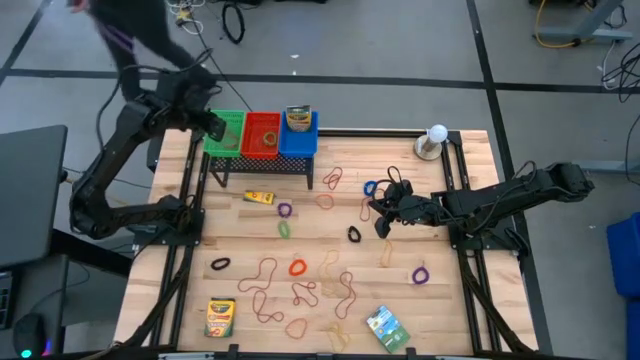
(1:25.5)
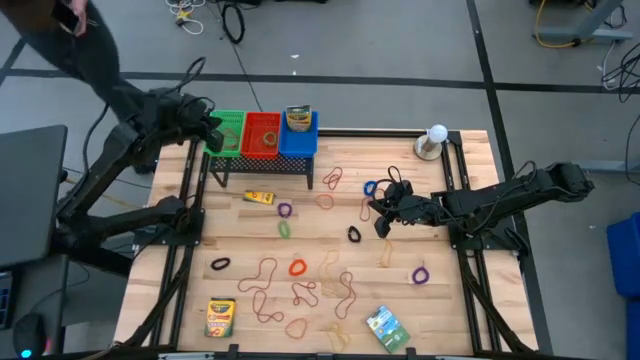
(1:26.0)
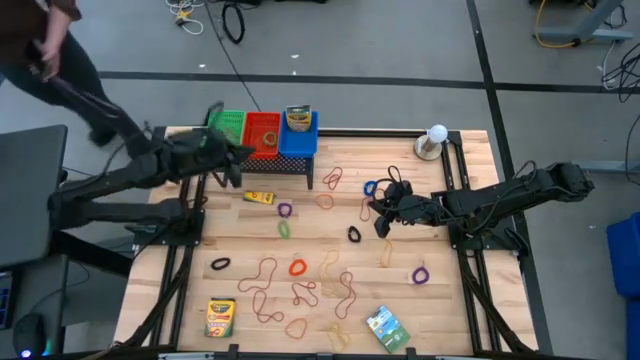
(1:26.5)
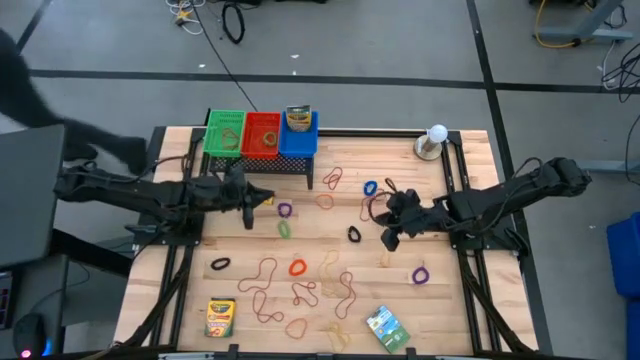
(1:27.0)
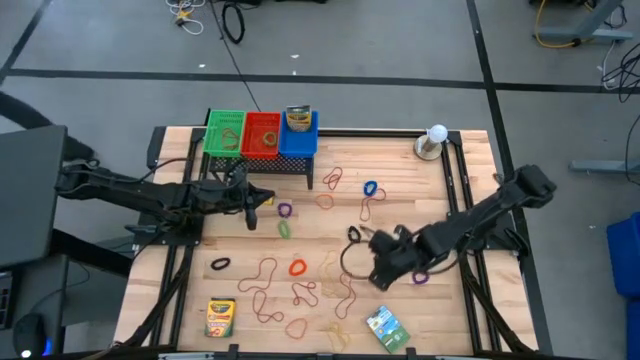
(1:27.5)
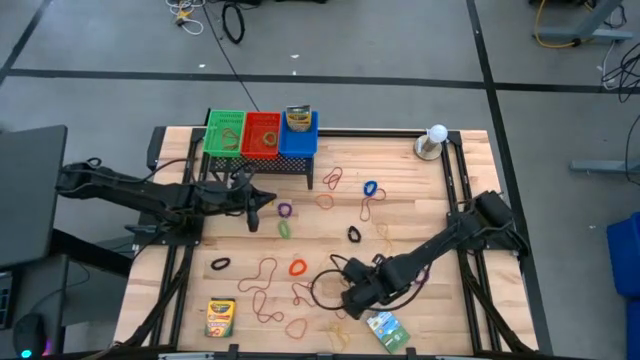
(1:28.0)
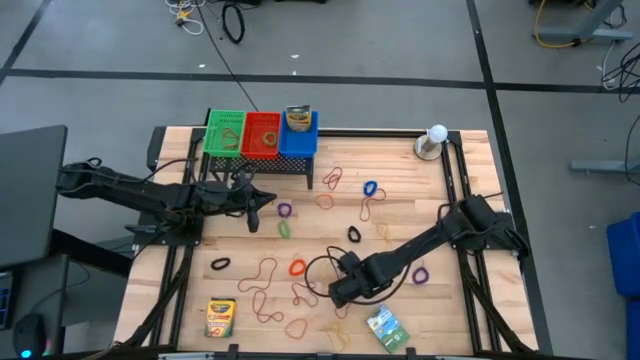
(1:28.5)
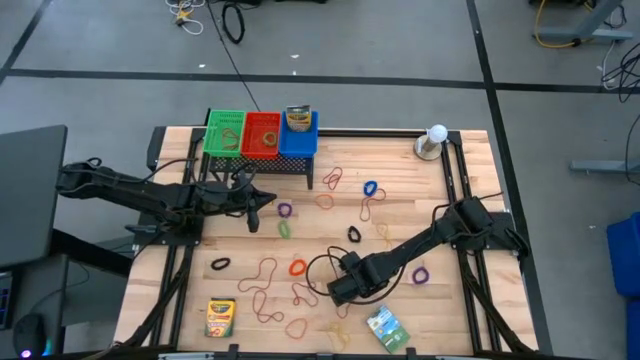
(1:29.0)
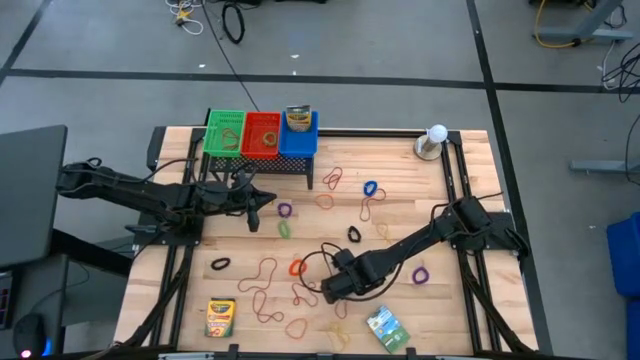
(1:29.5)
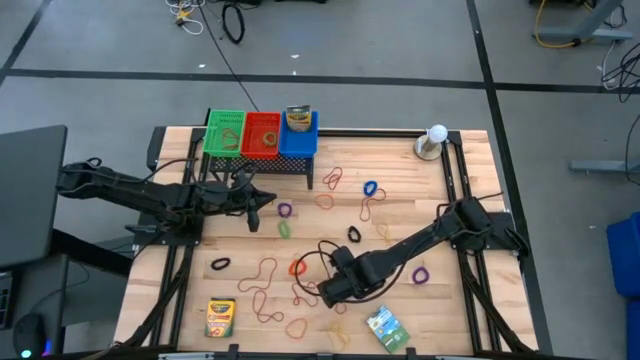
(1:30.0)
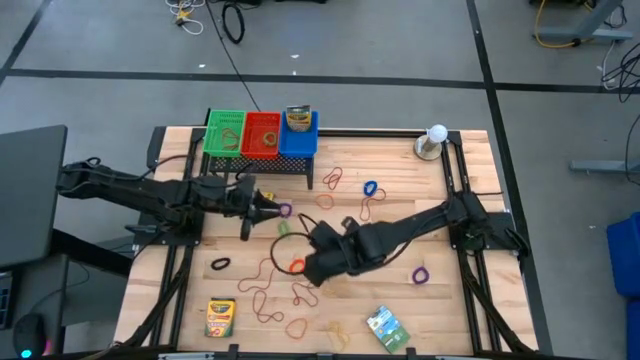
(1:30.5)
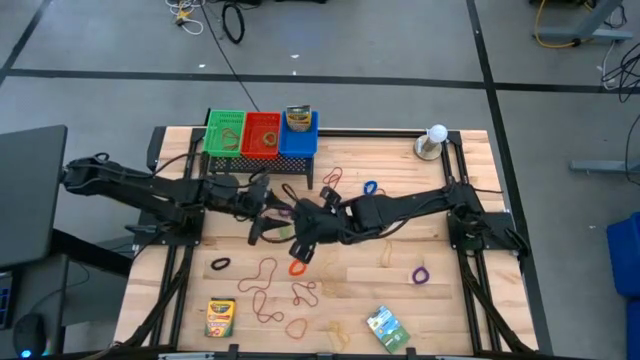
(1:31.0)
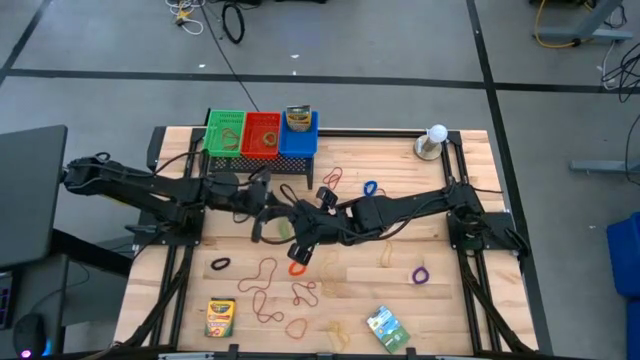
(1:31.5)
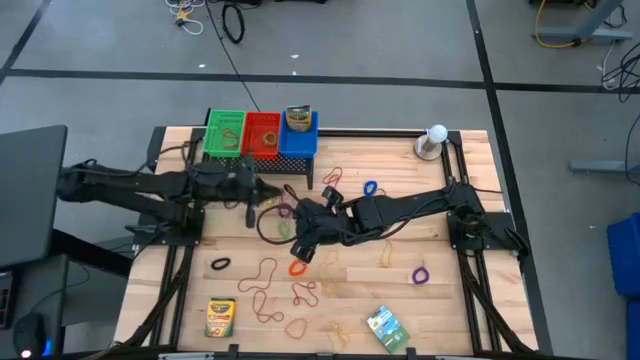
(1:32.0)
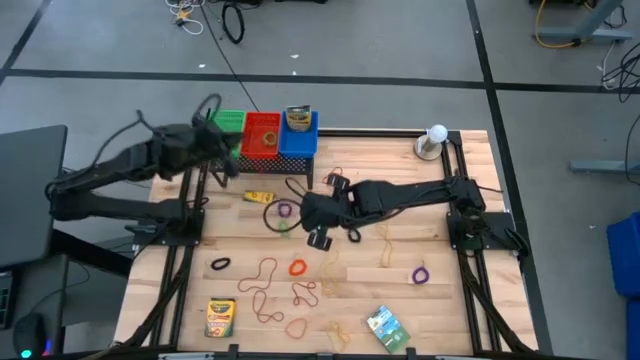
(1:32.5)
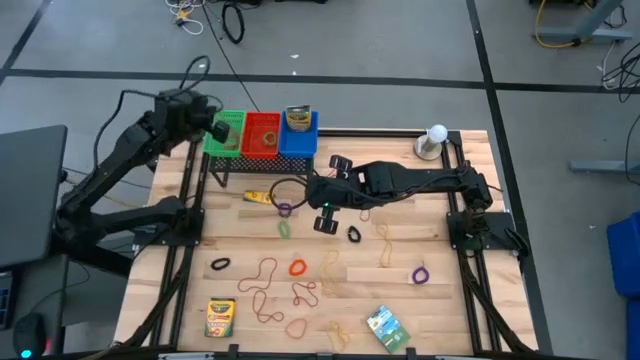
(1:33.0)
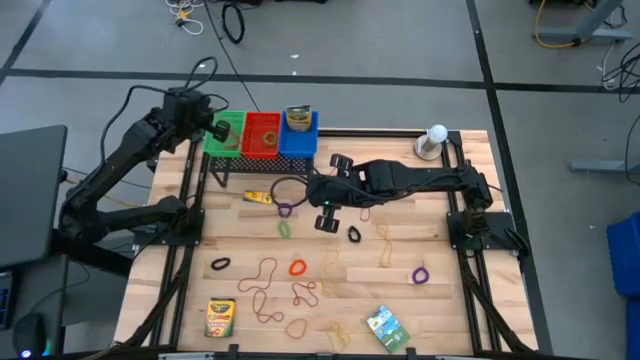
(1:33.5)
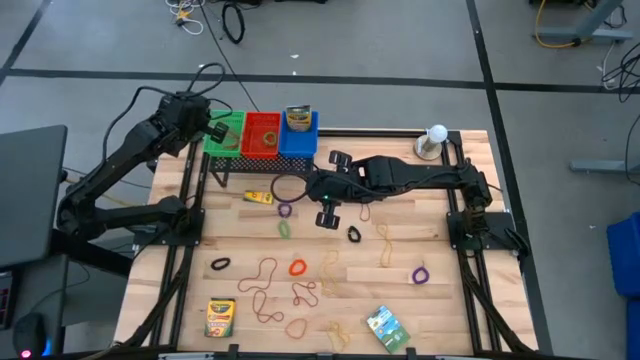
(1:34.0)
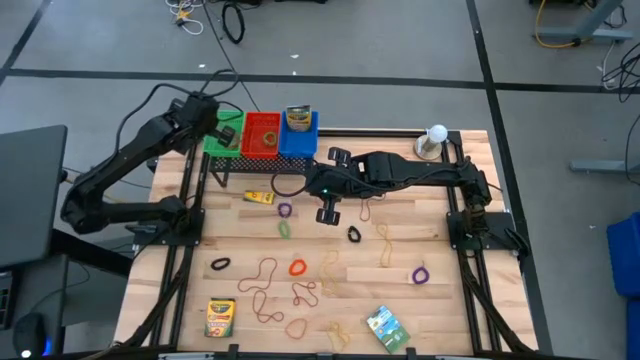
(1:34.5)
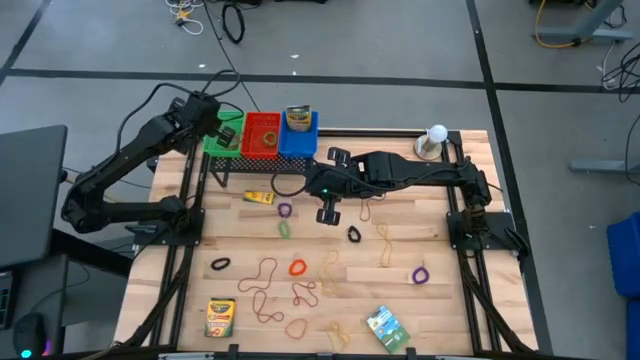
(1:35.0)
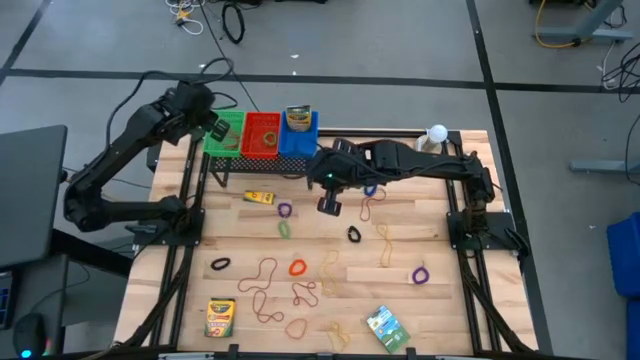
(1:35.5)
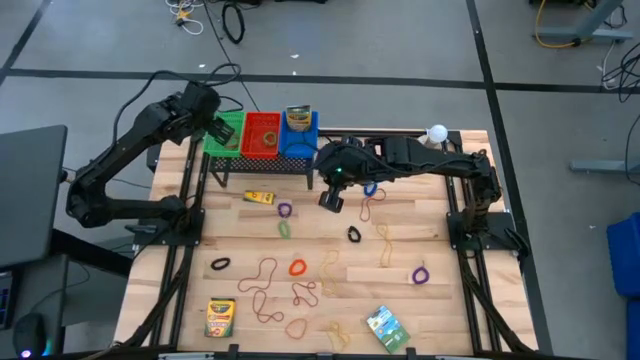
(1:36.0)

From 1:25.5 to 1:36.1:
Task: Pick & Place Office Desk Supplies
Put the red rubber band into the green bin on the shelf

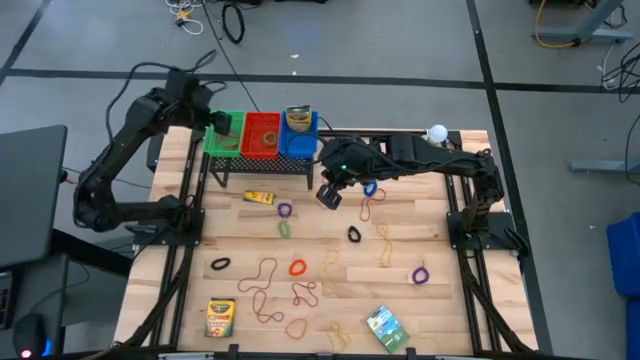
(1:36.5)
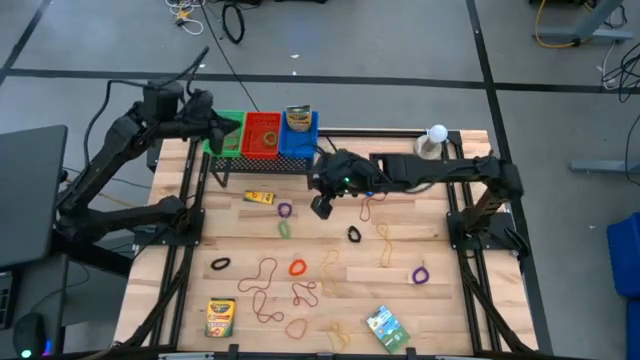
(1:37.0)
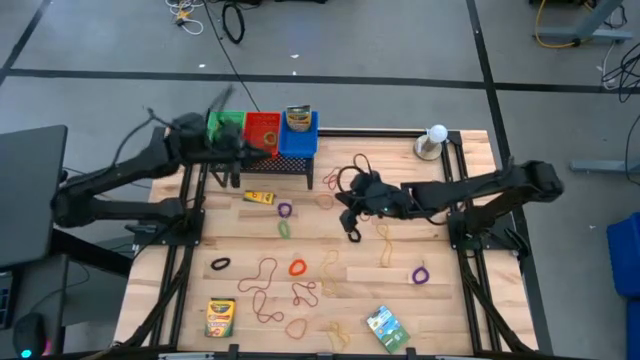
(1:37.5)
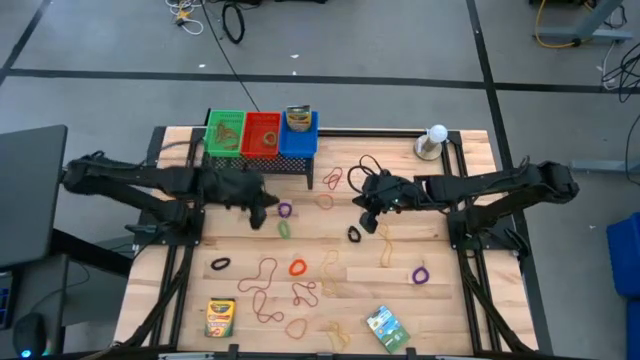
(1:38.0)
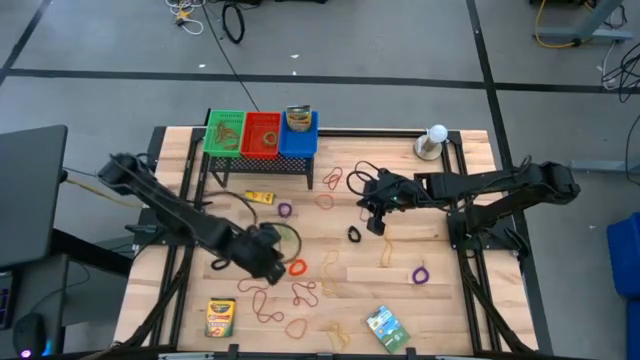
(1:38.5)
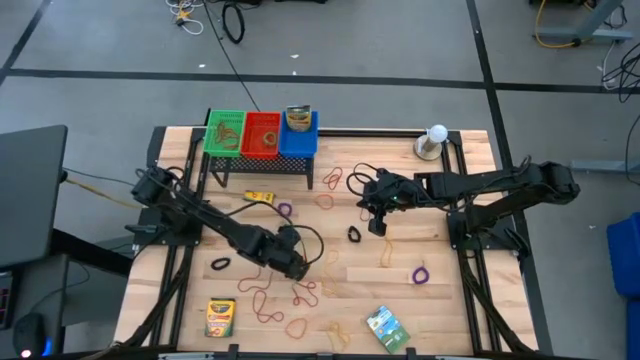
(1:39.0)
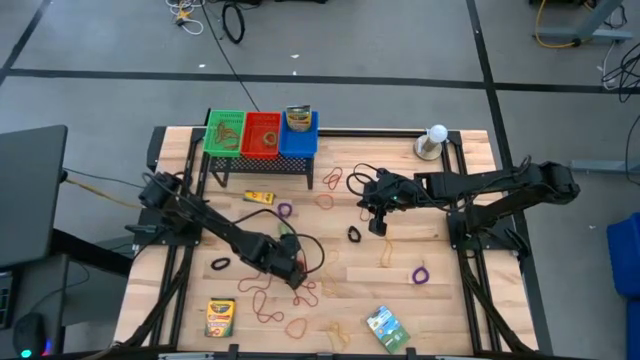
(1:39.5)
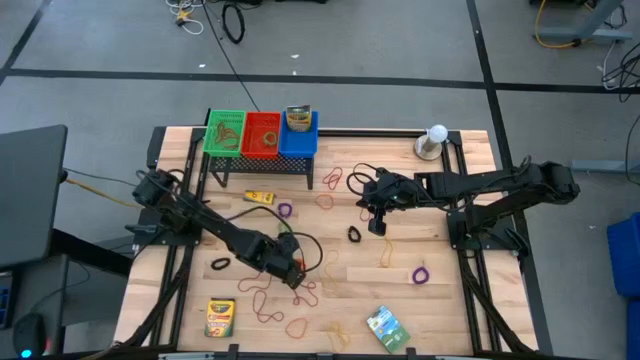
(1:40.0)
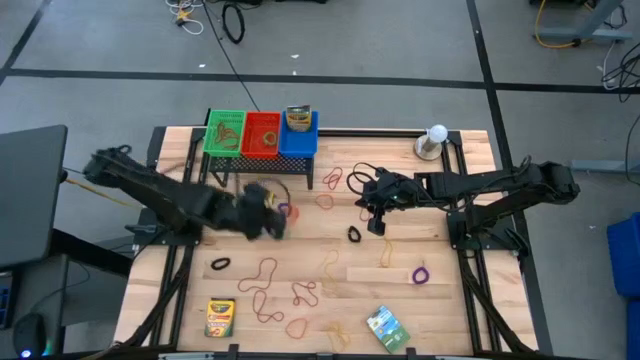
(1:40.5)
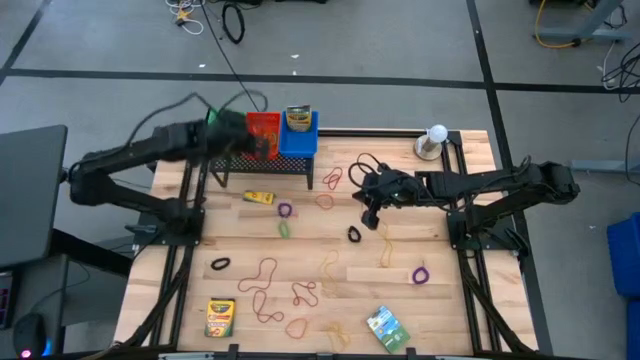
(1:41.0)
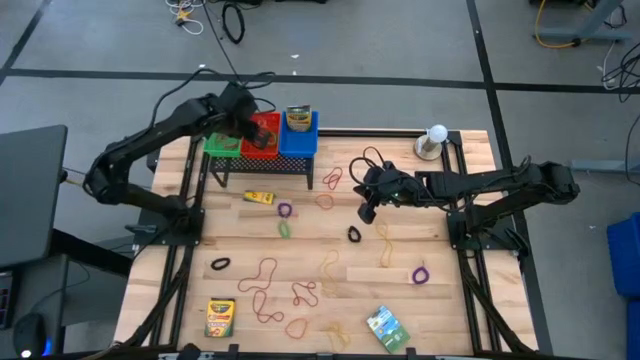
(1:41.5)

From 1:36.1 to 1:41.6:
Put the orange spring rubber band into the red bin on the shelf

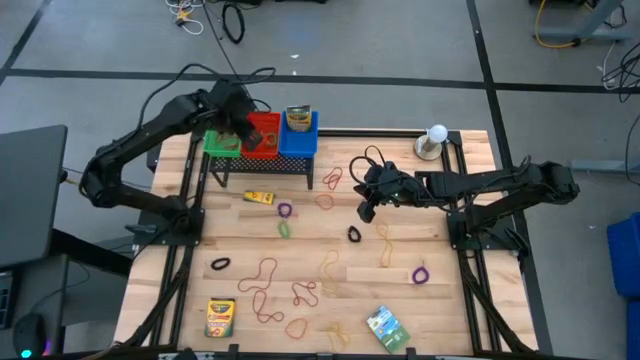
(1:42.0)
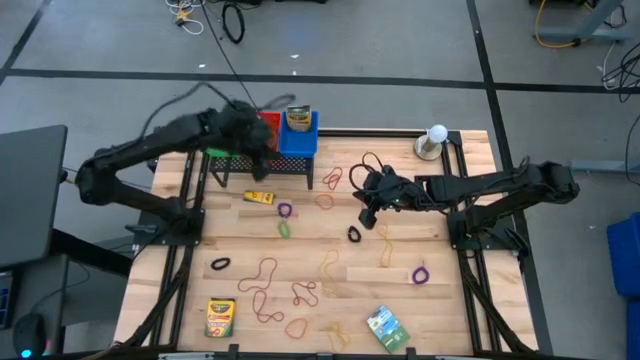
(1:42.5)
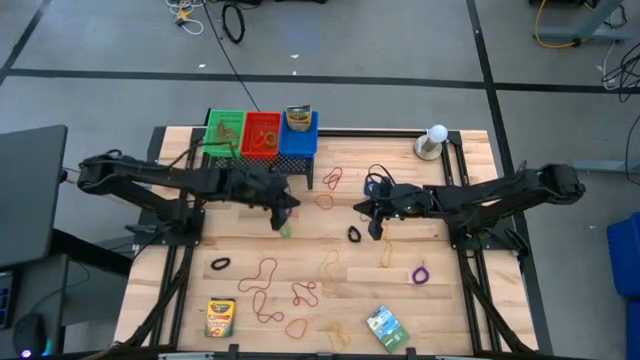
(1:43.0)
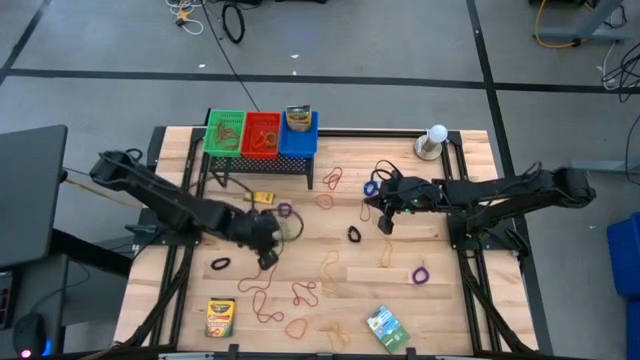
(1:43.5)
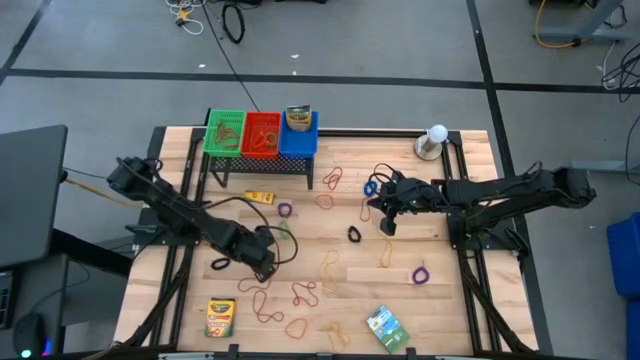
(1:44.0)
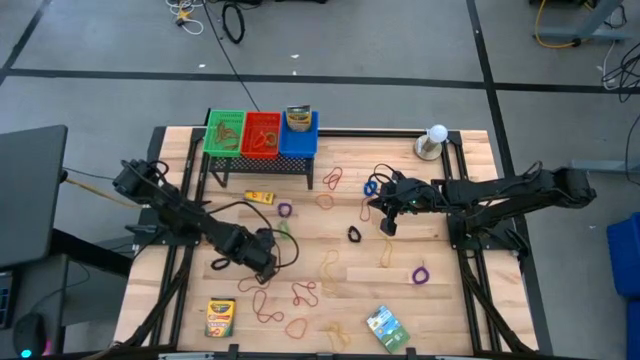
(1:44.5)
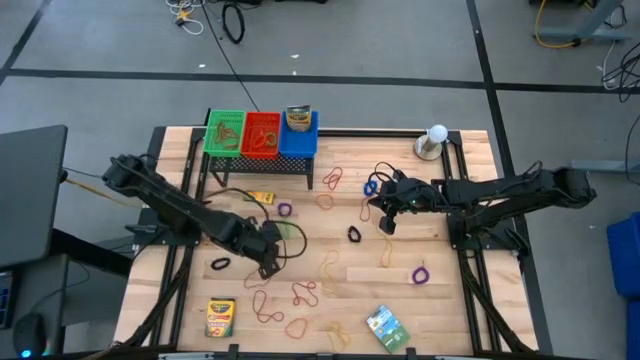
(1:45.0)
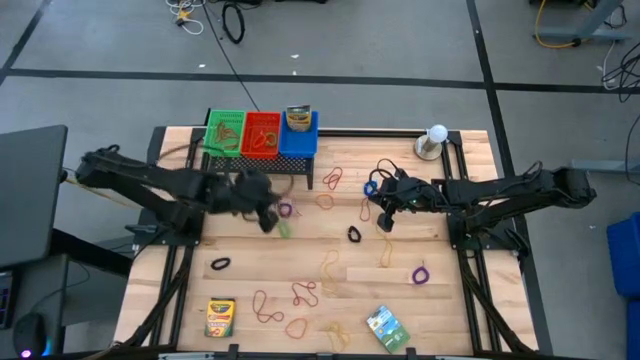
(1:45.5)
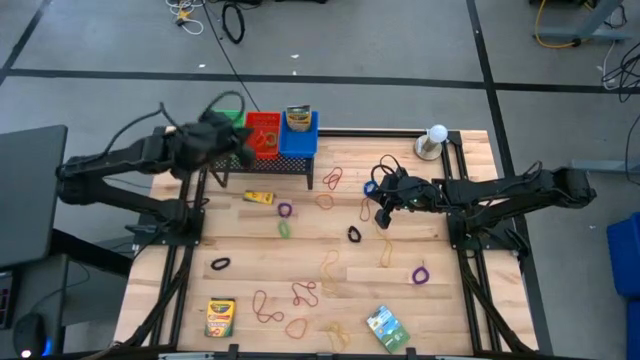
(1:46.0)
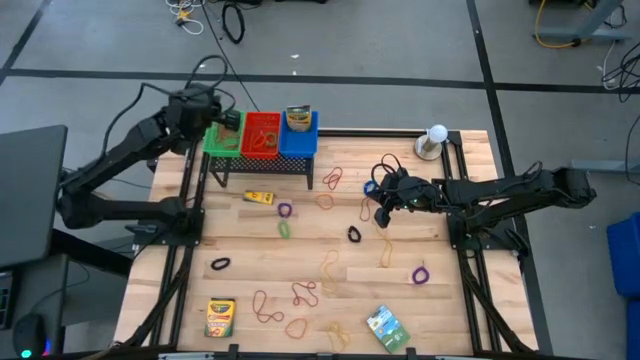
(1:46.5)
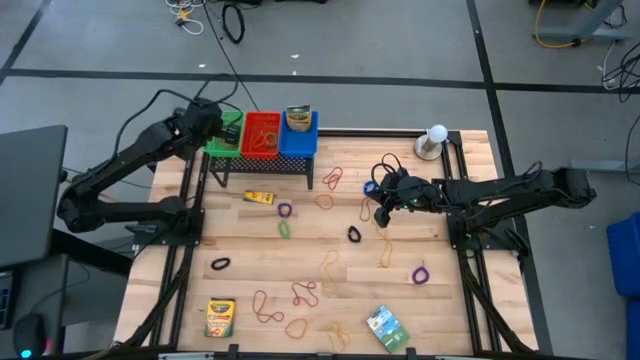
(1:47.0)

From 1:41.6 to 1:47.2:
Put the red rubber band into the green bin on the shelf
